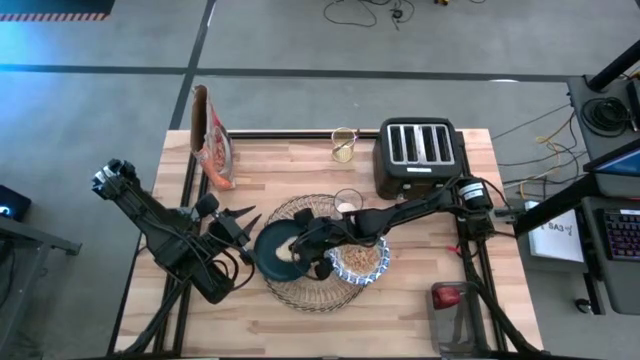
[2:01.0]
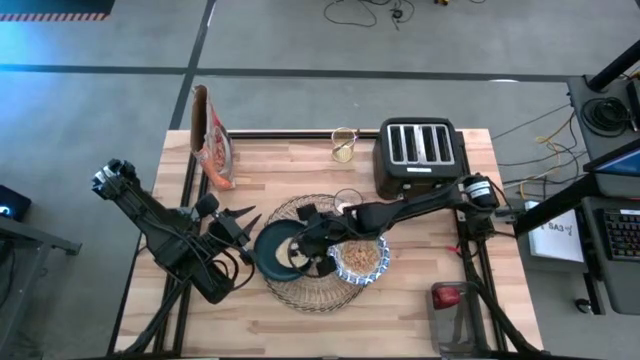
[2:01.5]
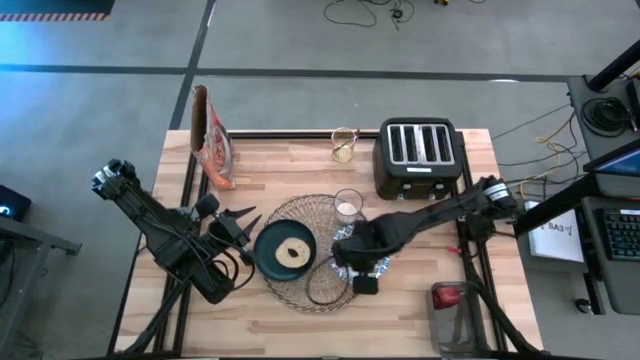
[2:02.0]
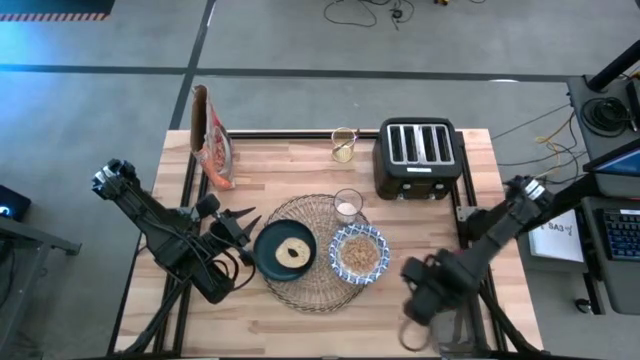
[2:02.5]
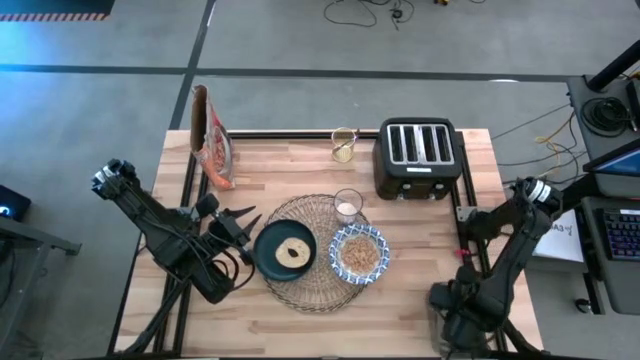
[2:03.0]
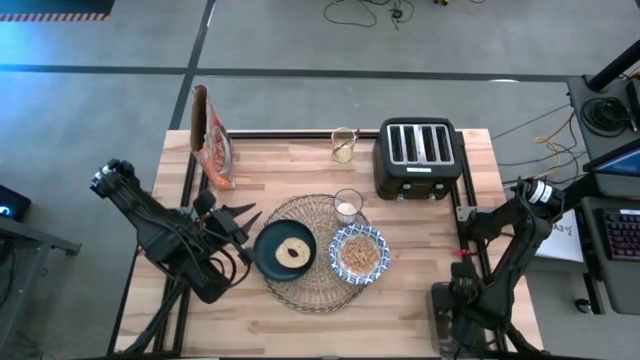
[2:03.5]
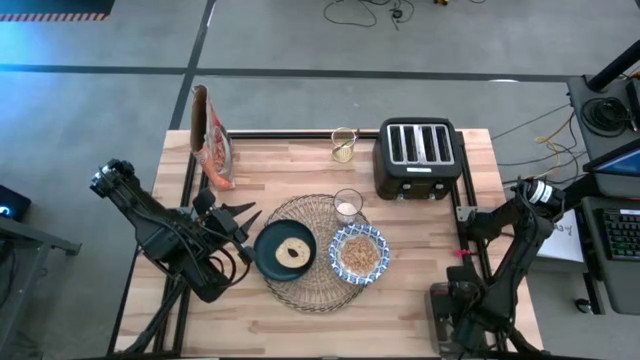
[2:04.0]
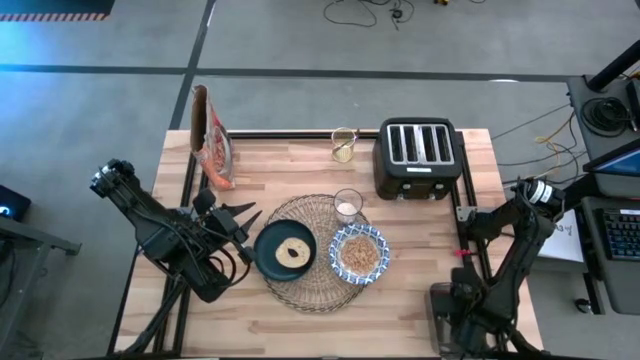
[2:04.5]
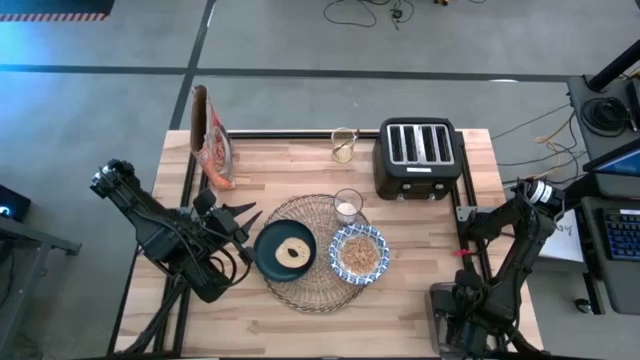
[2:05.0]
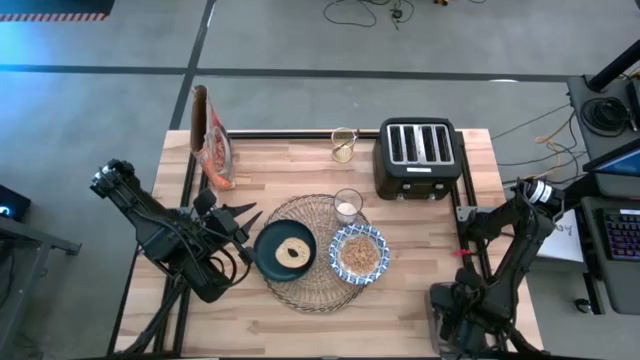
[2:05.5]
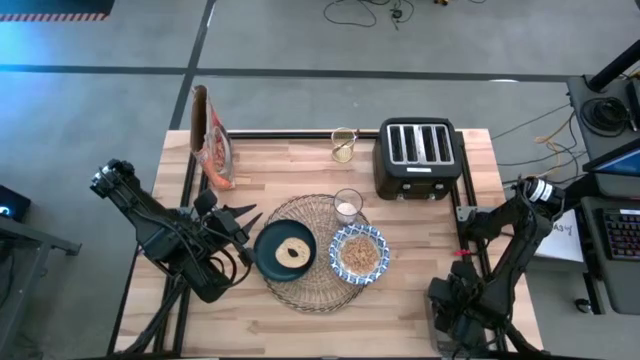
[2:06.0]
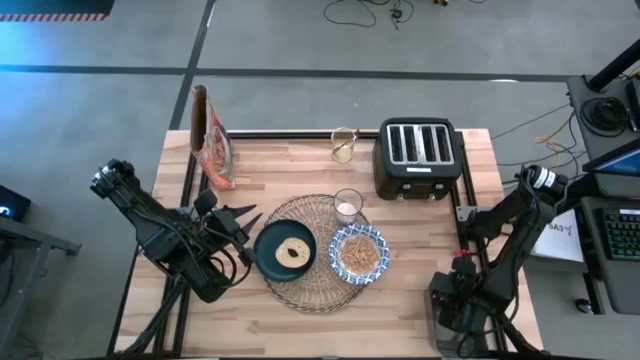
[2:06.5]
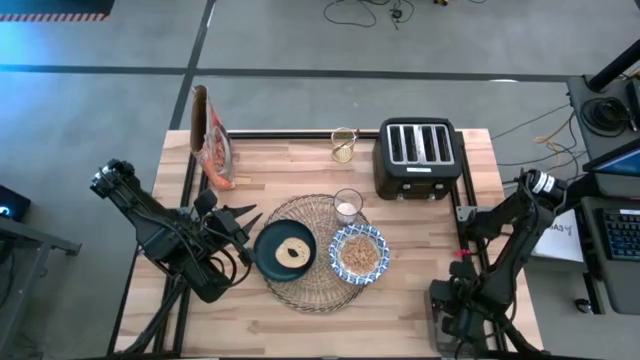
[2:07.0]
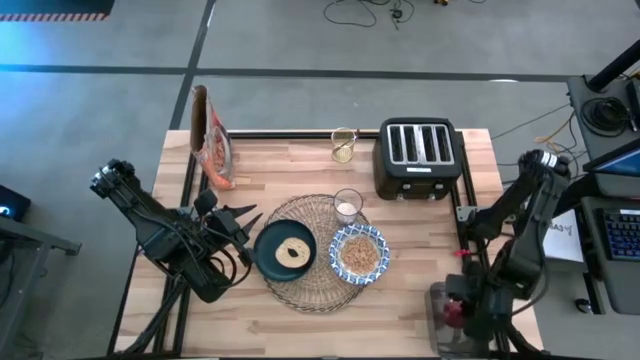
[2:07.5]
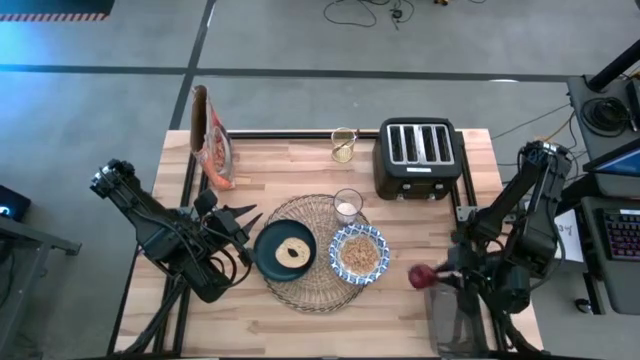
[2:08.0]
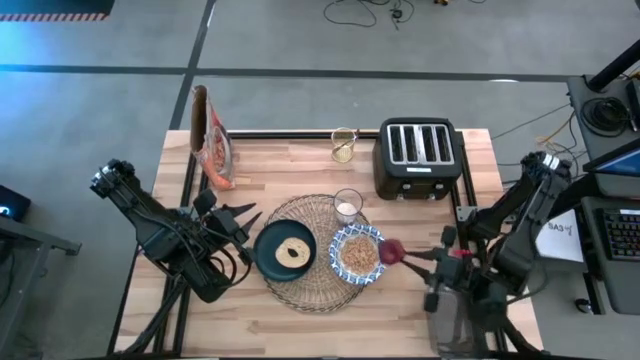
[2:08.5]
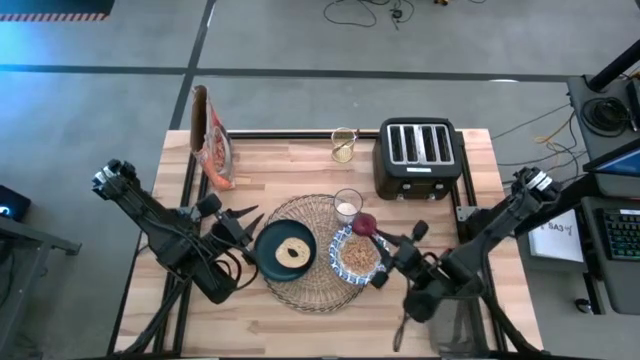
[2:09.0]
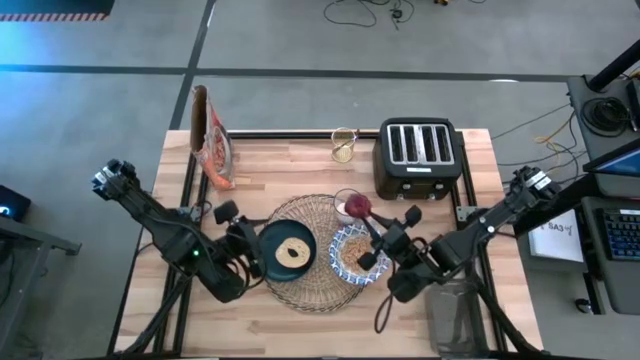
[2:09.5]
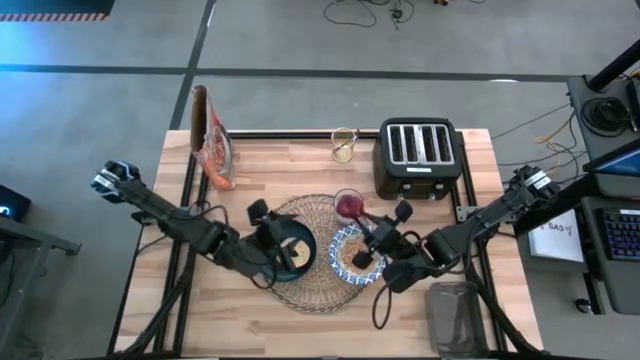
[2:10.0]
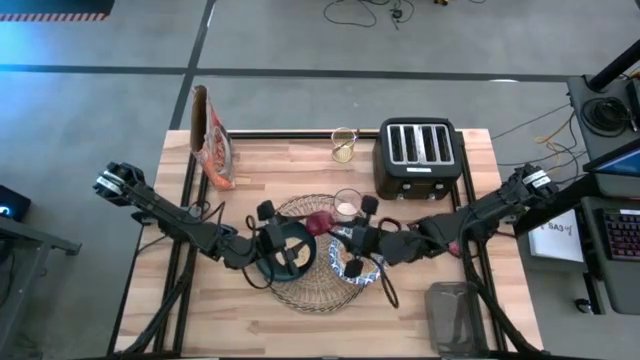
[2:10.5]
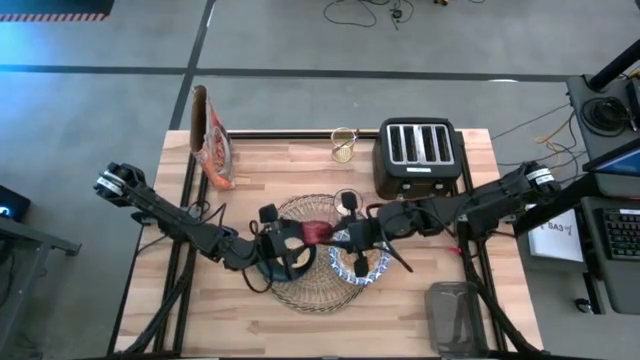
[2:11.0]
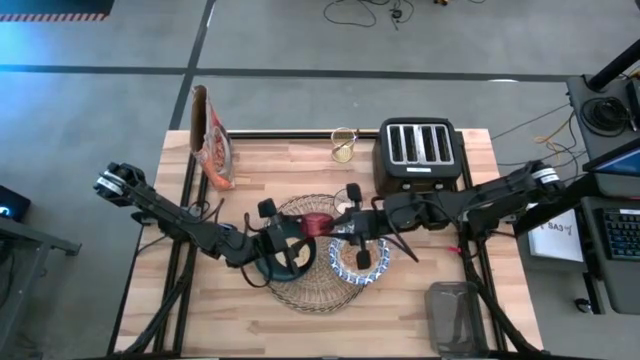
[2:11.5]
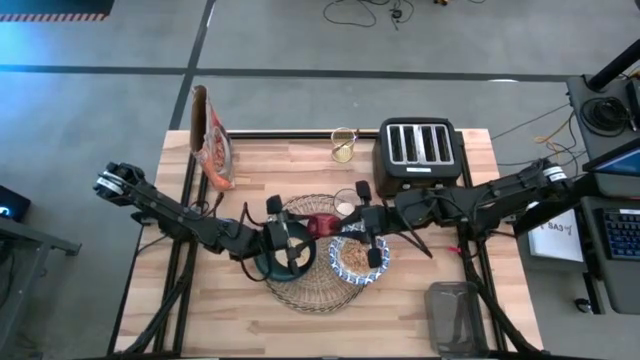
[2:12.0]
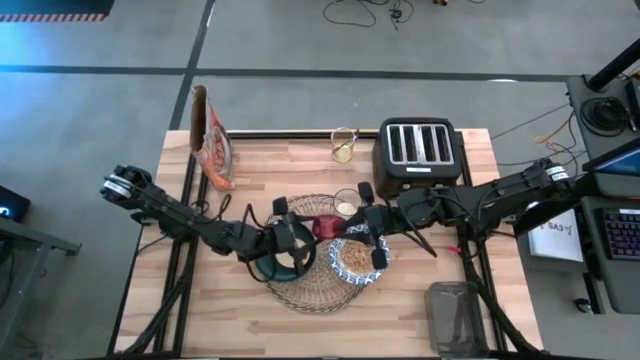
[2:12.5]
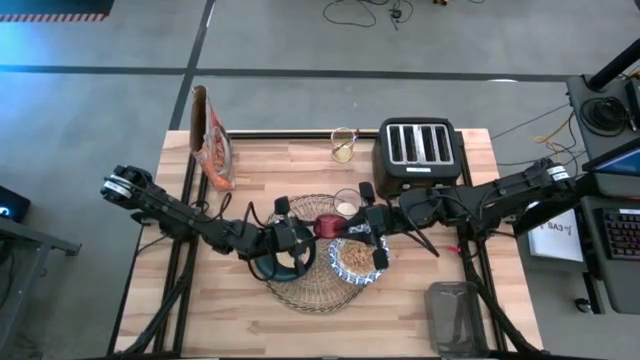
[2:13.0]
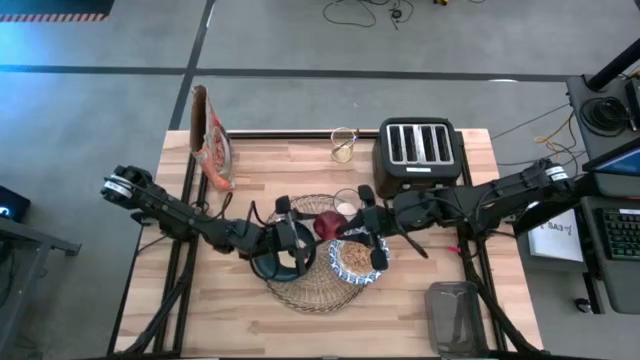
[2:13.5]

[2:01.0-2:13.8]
Task: Arrange a breakfast setting
Put the red apple on the brown table mat

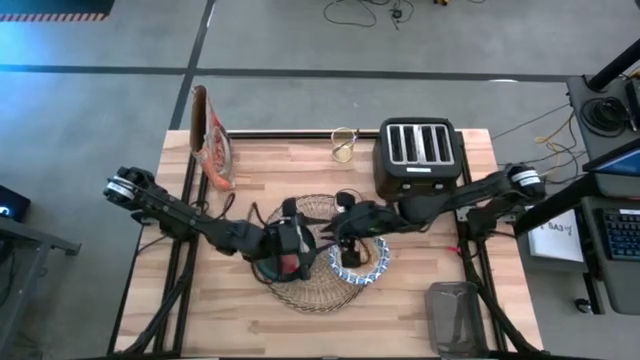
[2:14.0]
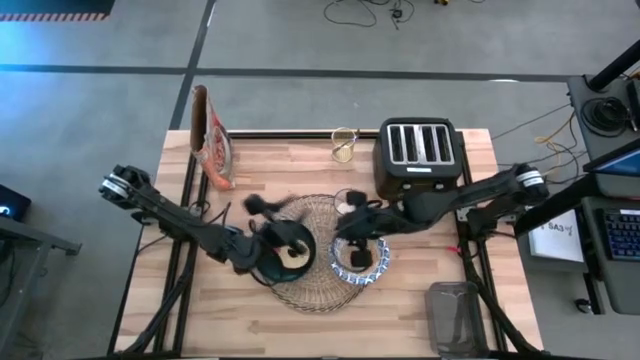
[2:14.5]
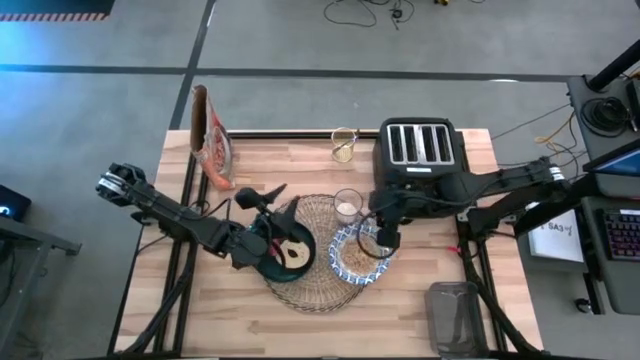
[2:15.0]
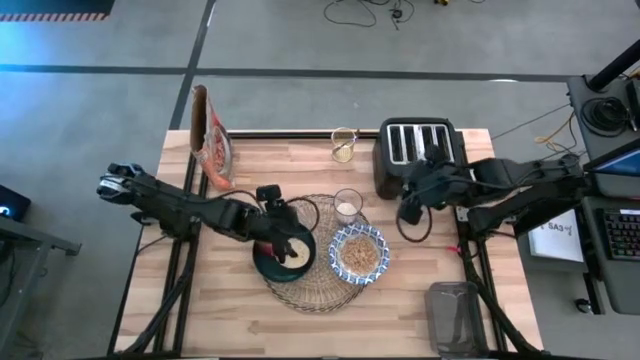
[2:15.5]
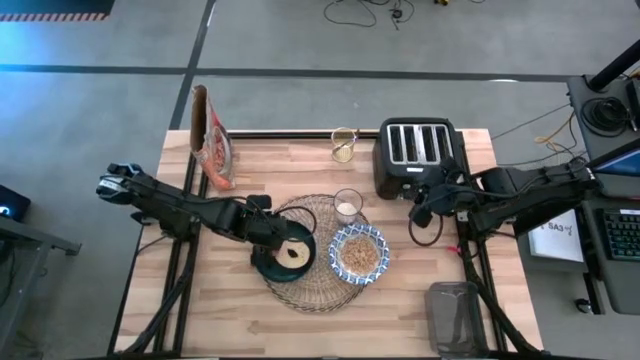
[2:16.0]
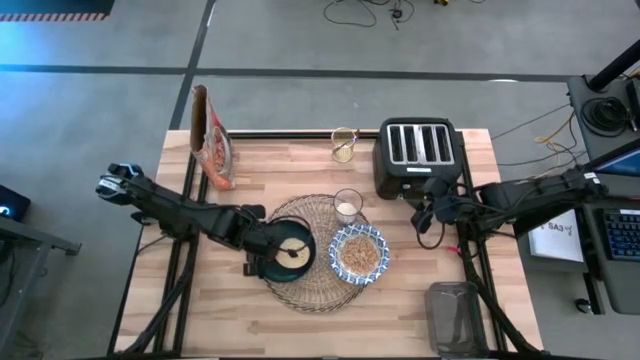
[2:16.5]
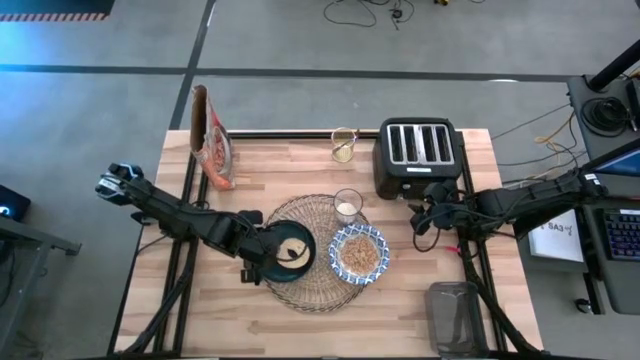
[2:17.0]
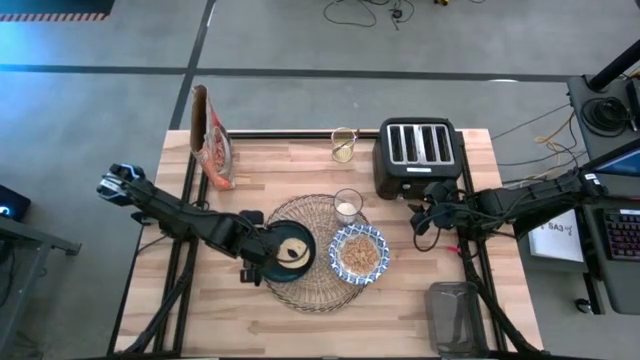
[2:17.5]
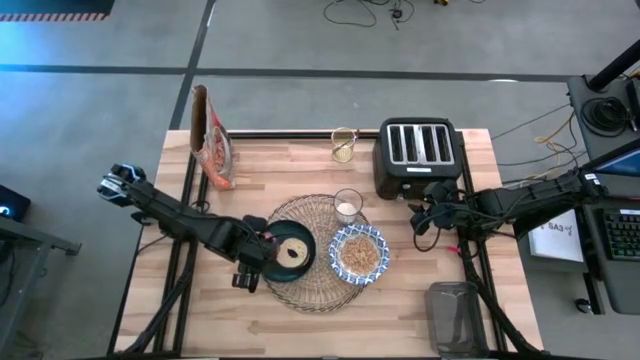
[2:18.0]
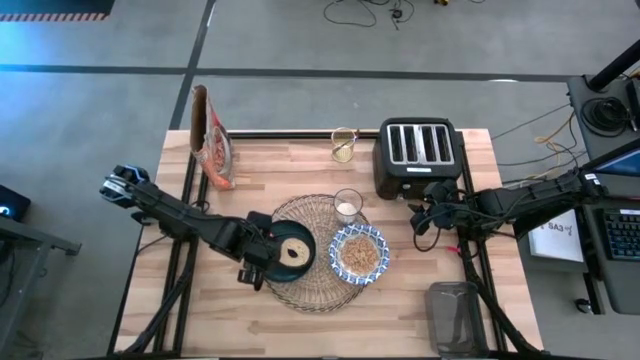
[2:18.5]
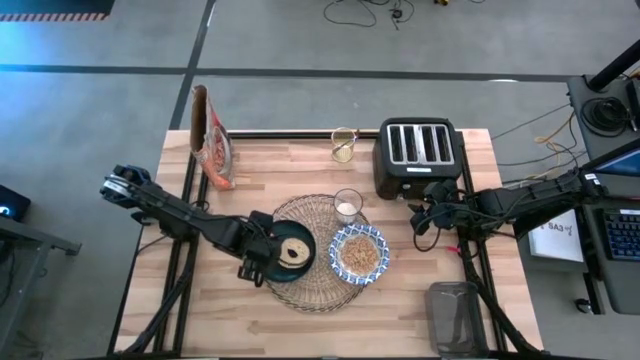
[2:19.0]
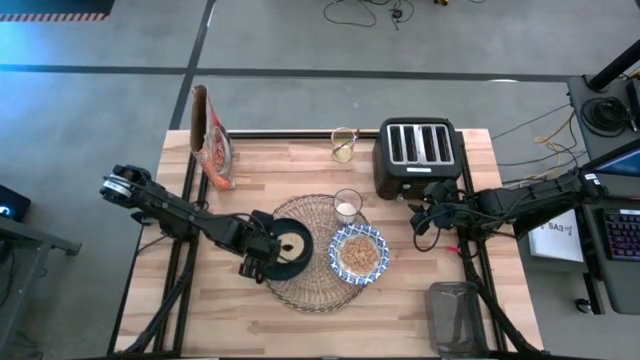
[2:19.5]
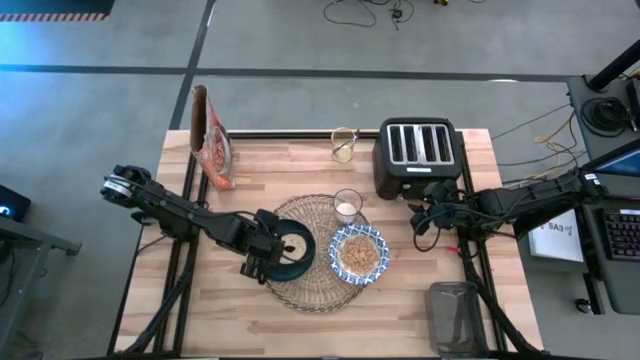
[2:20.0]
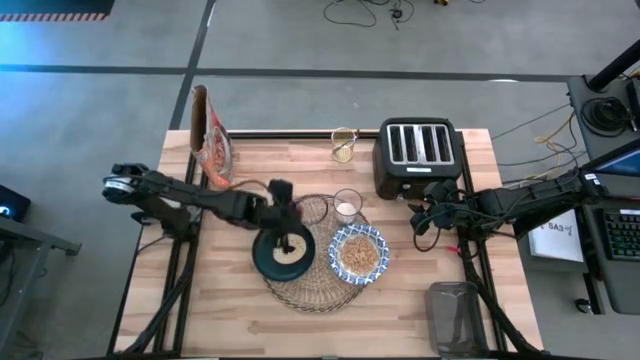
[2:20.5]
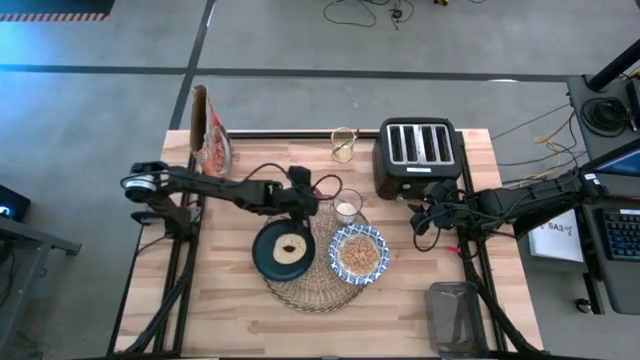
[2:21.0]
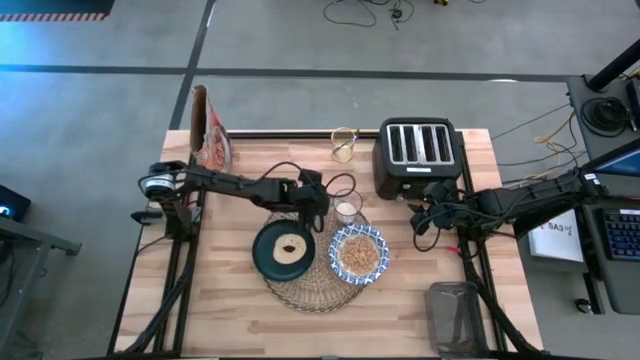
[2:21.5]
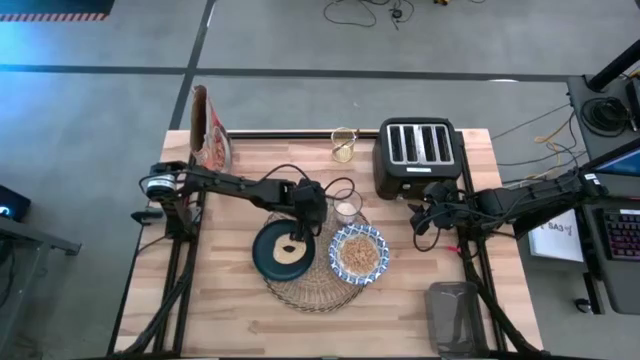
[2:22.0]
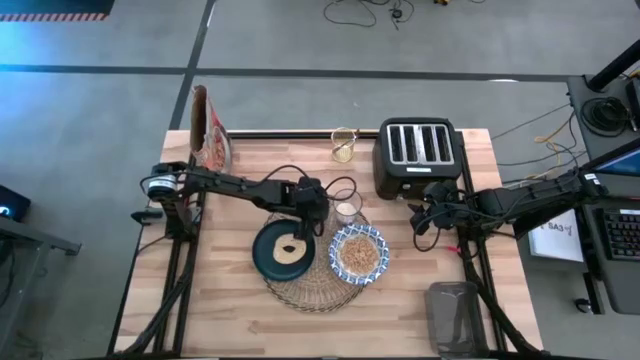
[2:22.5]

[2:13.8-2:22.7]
Put the red apple on the brown table mat
